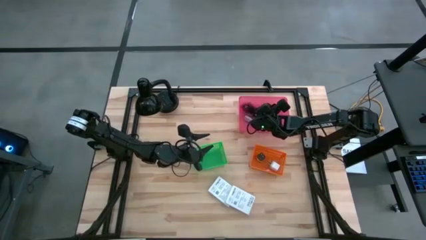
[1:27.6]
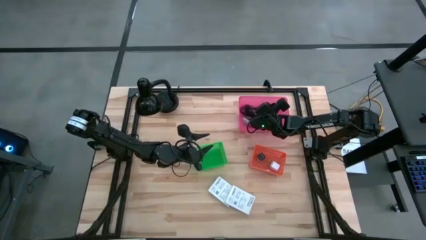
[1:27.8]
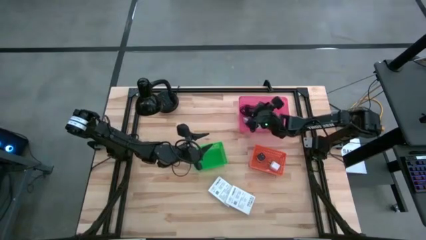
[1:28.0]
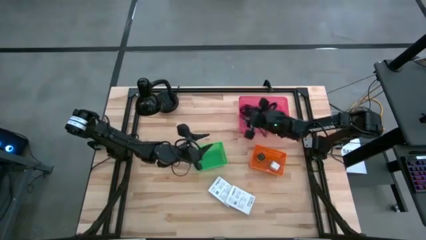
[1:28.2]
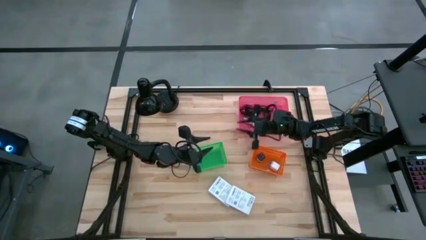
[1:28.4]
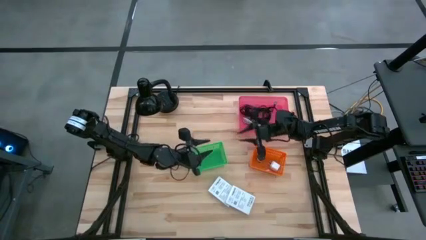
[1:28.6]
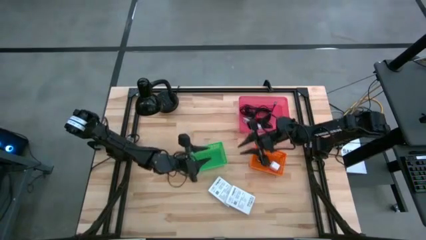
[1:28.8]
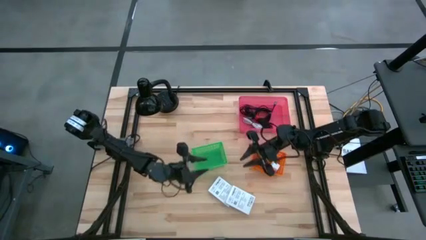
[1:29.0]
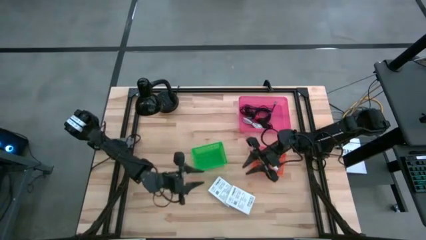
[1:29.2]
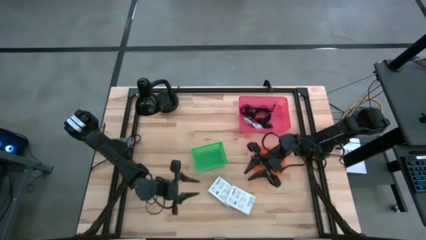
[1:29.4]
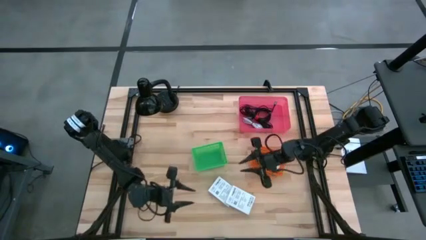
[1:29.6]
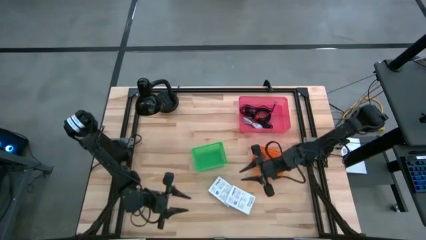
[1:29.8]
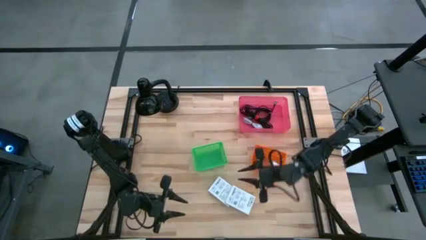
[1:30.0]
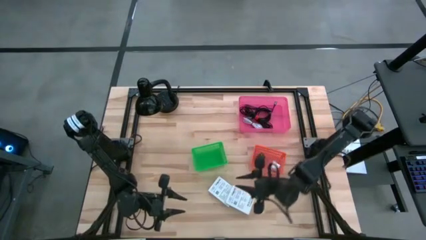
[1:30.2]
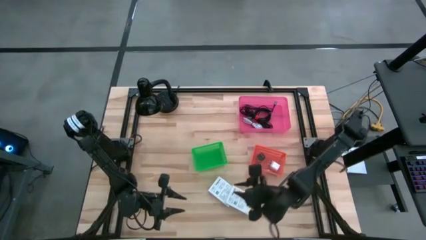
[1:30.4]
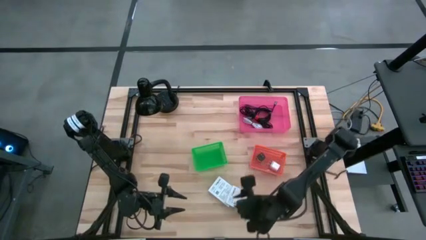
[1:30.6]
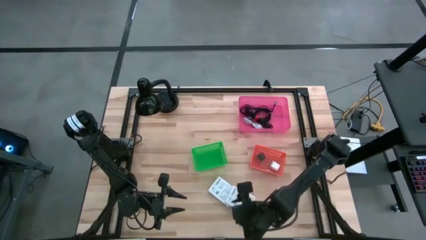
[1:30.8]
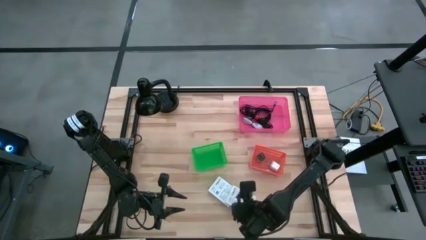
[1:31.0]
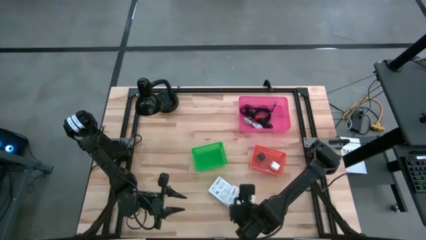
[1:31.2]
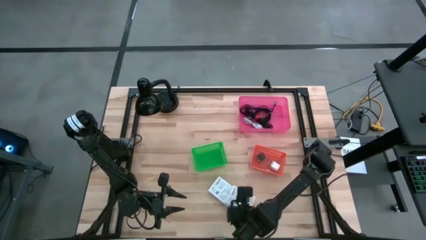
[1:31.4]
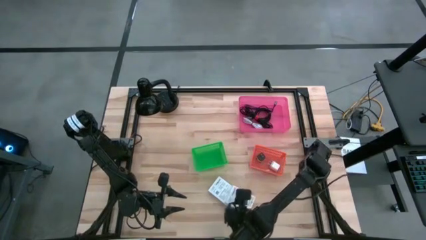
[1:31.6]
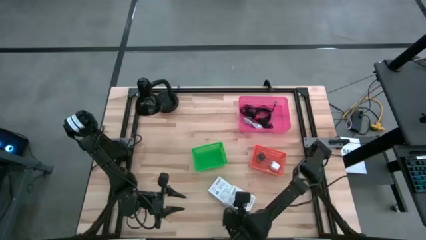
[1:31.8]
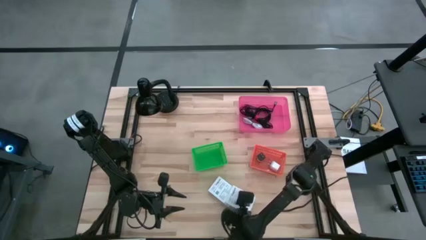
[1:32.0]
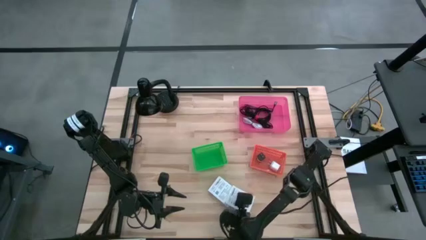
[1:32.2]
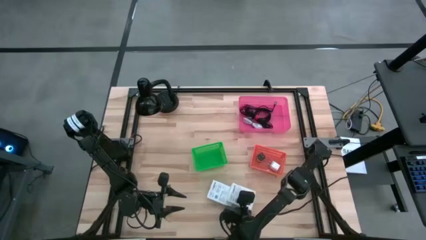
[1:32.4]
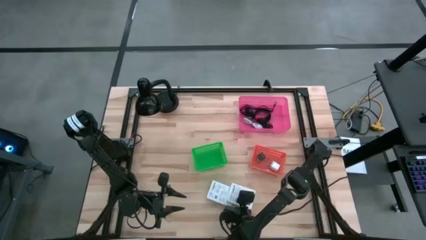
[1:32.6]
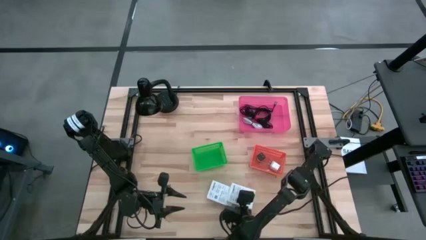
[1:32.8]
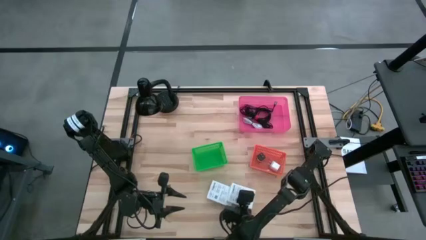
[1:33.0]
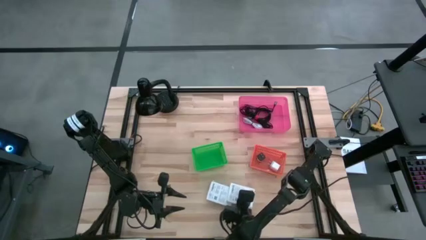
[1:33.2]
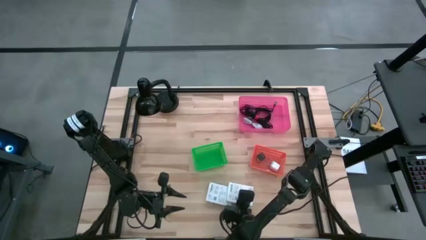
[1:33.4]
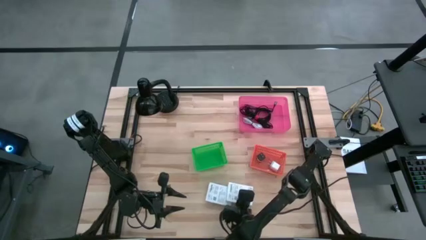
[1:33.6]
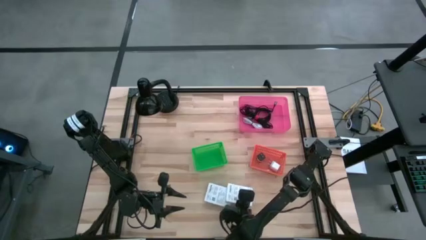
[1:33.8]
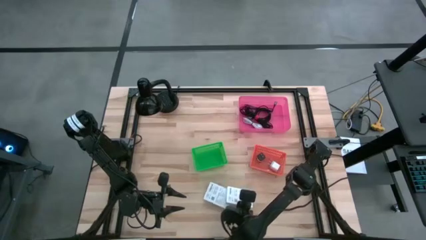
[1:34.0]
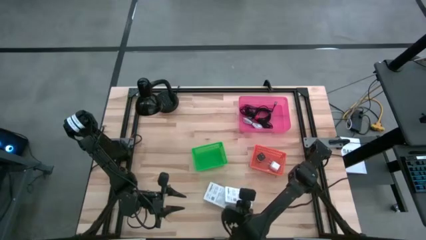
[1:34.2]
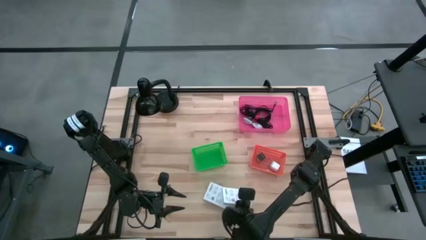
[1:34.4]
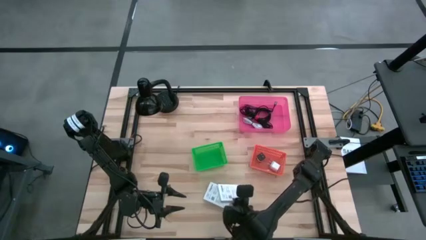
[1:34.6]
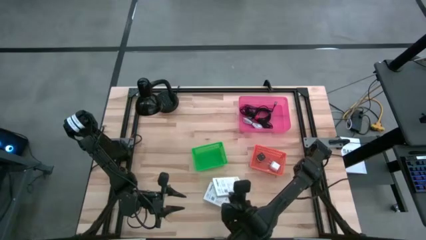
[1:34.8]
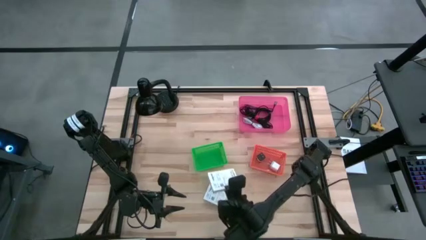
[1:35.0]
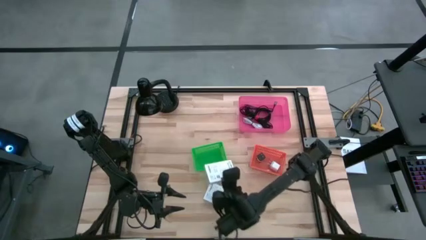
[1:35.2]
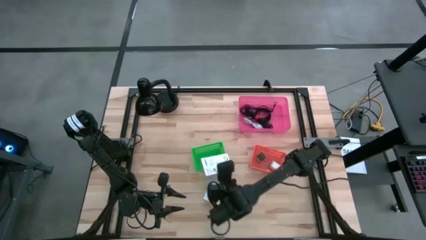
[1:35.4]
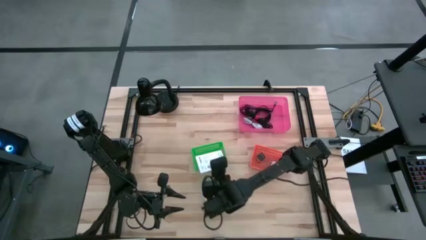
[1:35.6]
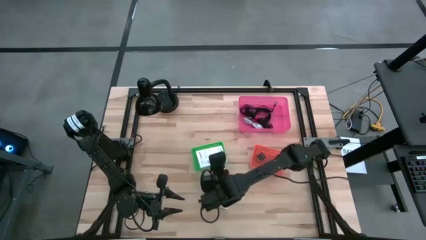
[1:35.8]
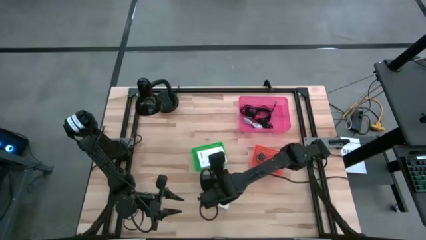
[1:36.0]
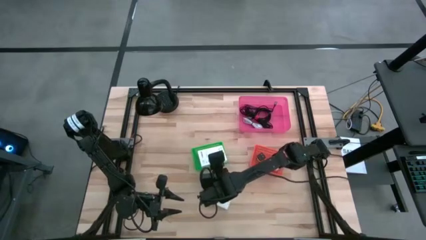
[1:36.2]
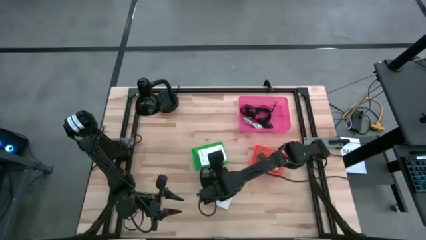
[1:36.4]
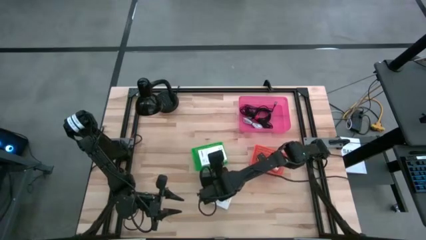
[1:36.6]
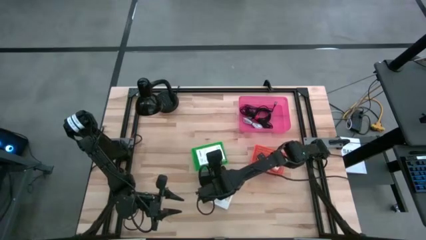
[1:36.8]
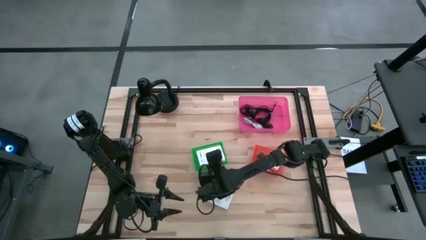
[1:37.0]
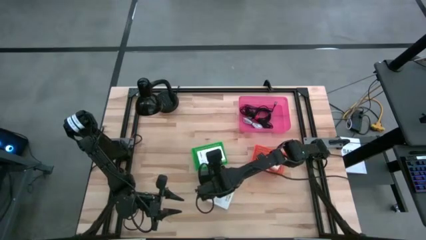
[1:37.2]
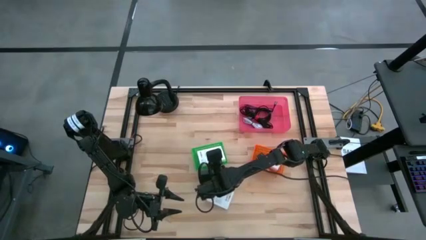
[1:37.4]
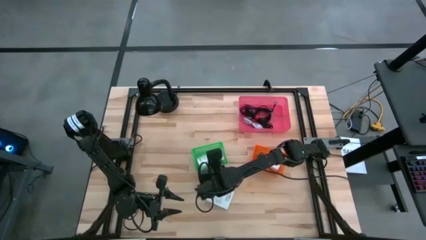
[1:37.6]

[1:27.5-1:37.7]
Task: Pick and place items into bin
Put the right card reader box into the green bin

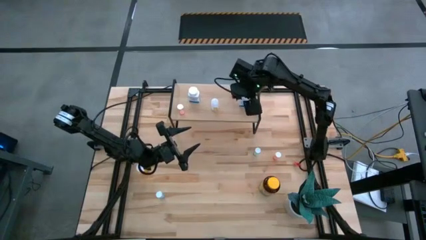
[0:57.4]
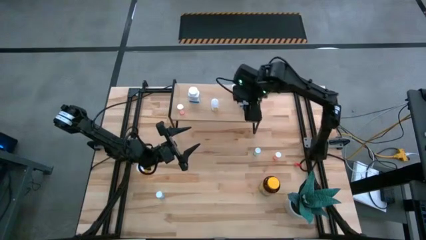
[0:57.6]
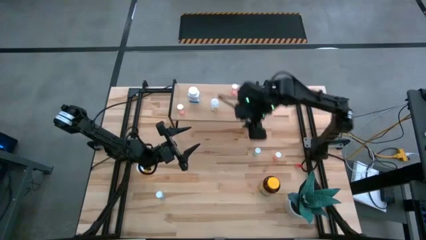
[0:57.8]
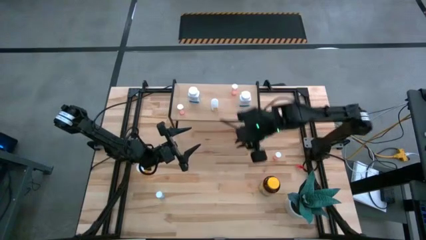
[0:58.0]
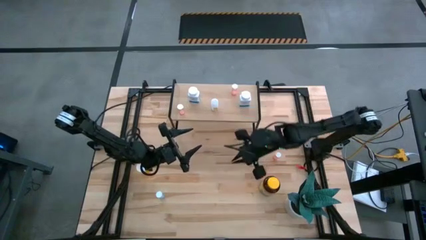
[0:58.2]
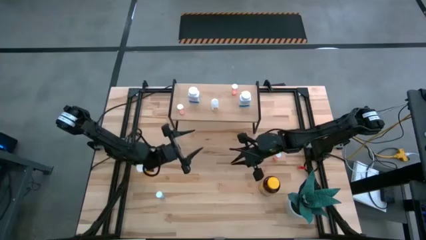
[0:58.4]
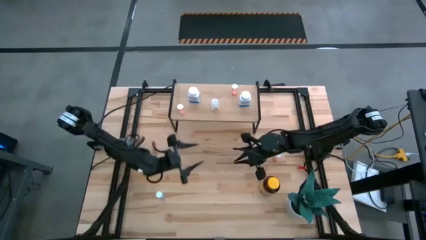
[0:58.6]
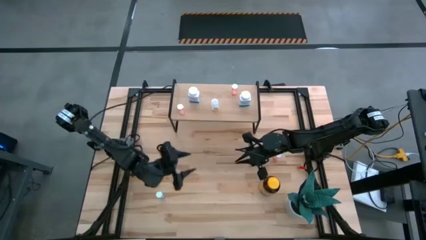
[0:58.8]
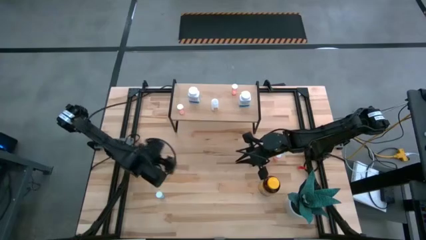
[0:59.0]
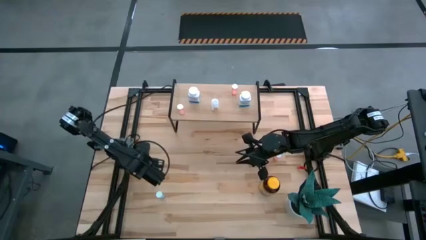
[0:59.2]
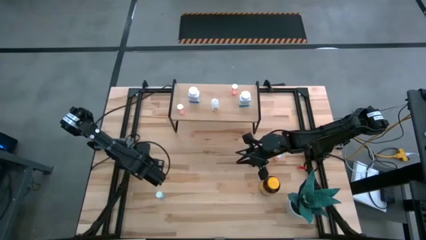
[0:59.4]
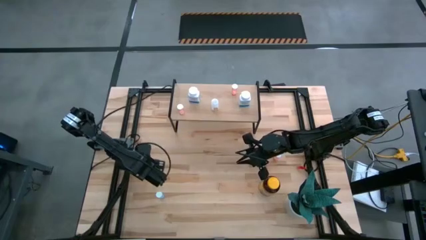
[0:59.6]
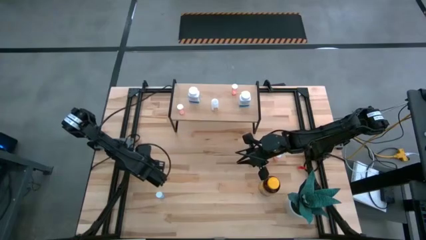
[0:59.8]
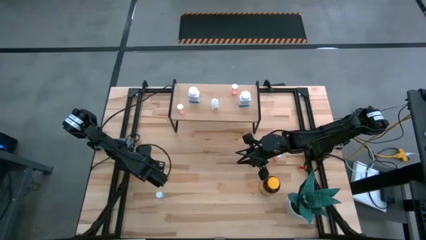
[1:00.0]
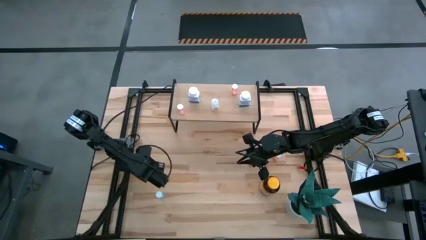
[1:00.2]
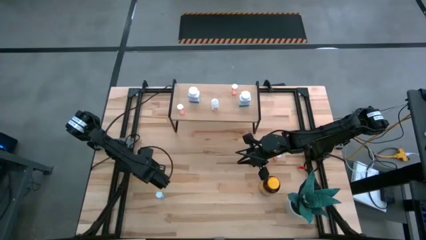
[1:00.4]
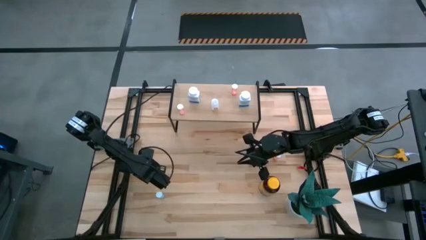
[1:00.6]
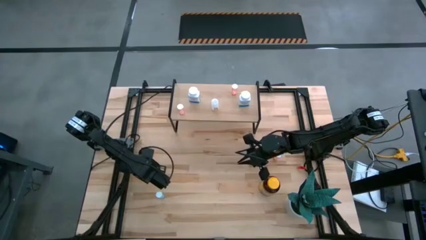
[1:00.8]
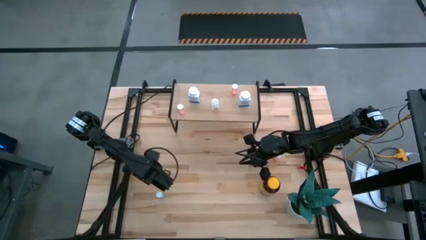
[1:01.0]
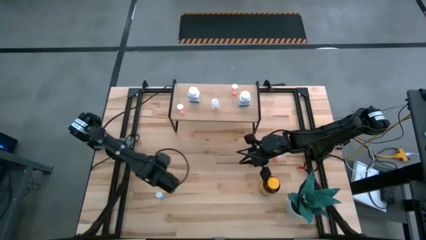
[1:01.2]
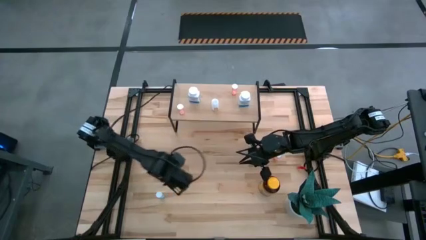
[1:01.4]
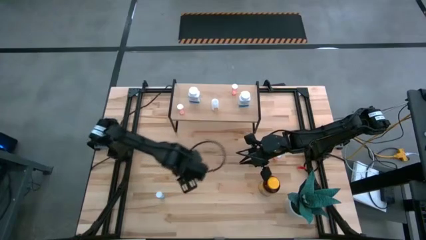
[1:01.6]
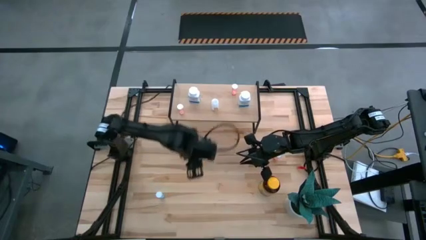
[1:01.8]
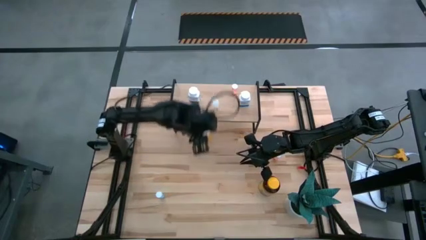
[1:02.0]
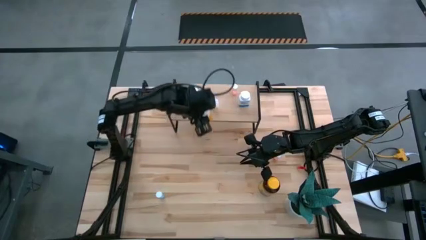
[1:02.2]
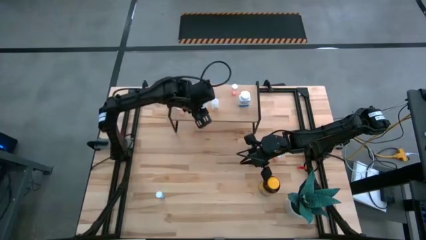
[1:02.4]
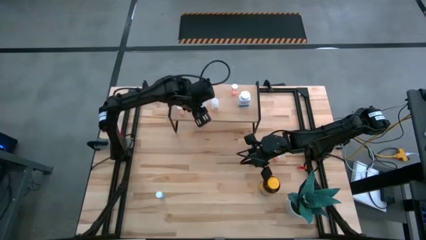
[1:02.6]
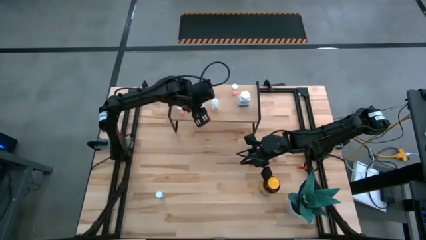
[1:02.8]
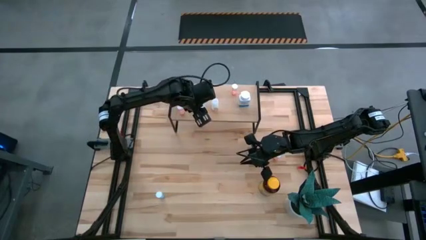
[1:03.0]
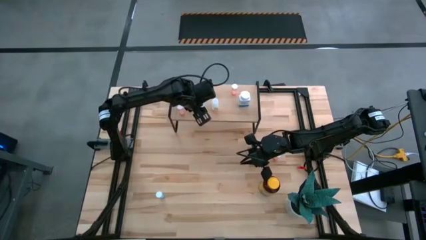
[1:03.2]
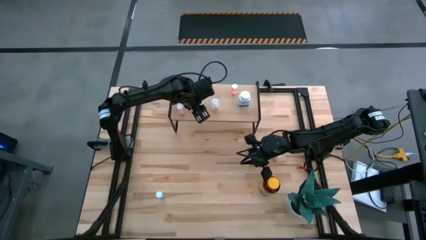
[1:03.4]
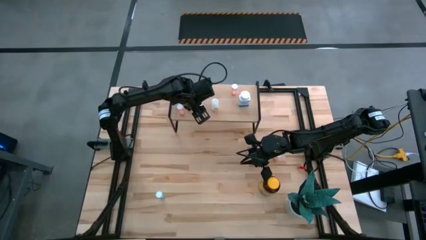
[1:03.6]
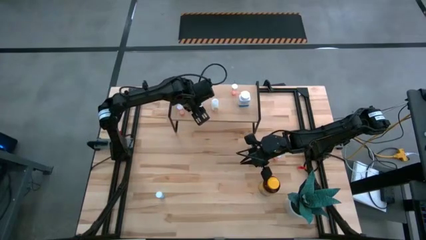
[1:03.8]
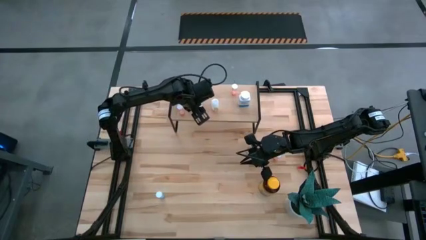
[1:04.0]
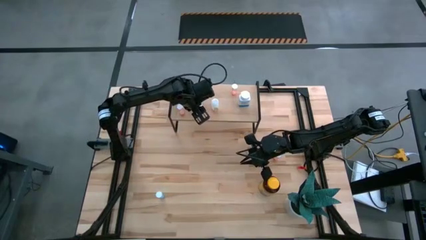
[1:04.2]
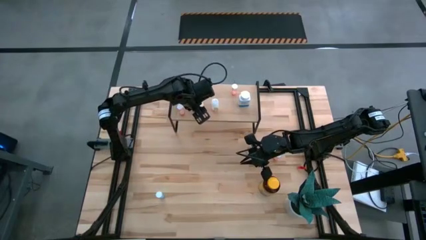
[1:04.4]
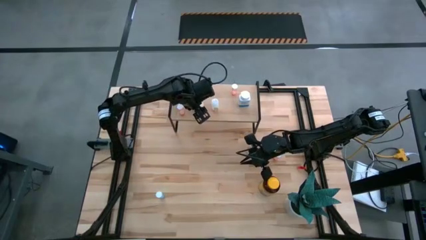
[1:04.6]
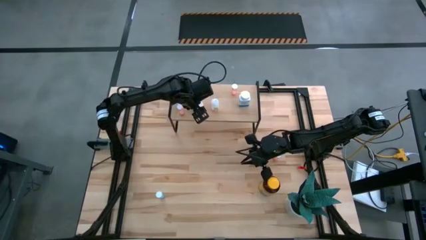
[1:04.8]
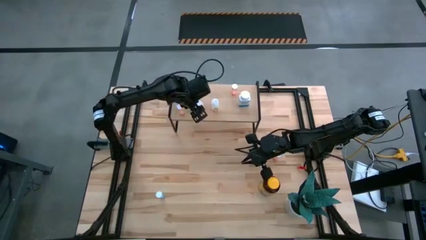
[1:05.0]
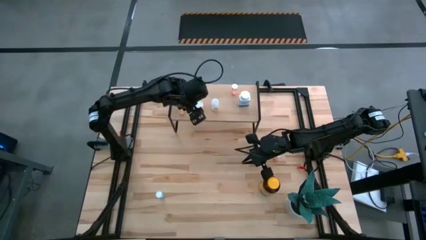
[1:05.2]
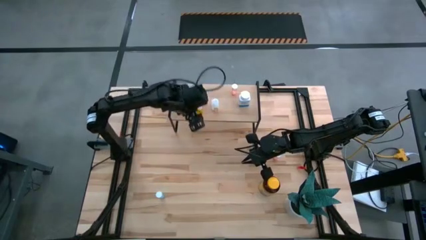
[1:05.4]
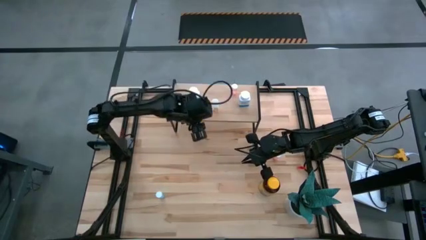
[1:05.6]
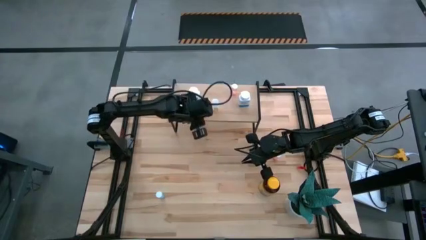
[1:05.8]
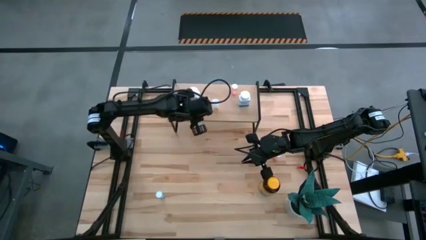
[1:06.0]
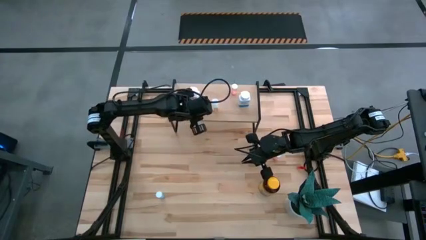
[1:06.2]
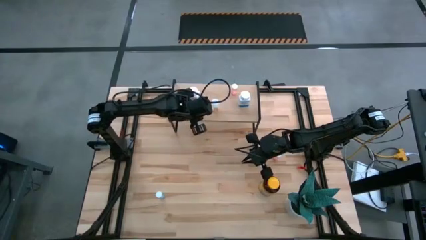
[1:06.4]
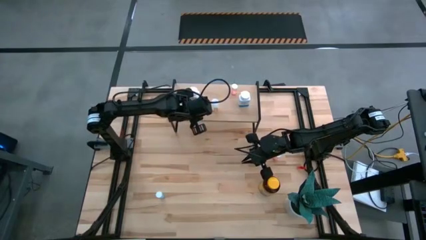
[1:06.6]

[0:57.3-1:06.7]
Task: Pick and place medicine bottles onto shelf by color
Put the orange pill bottle on the shelf
